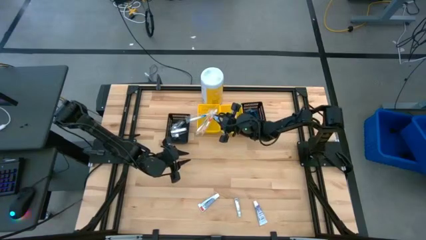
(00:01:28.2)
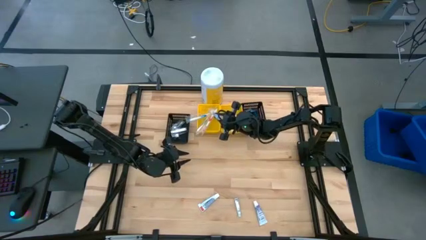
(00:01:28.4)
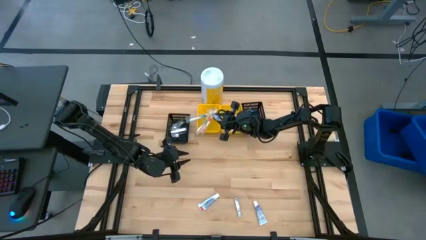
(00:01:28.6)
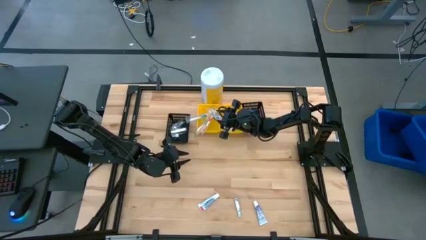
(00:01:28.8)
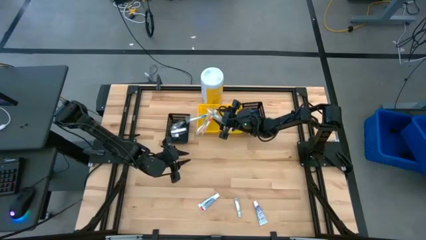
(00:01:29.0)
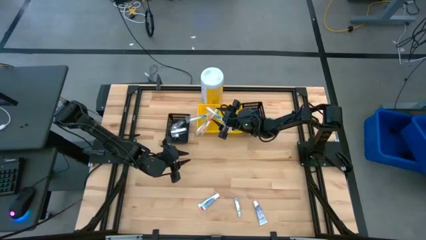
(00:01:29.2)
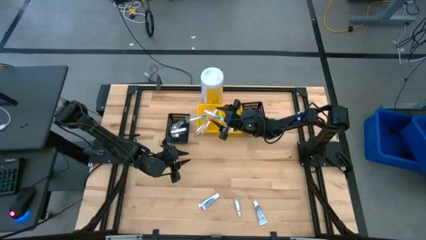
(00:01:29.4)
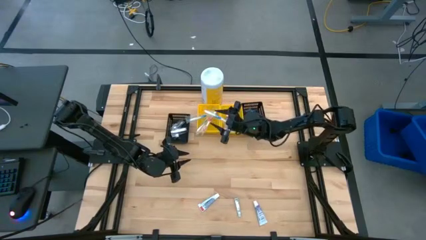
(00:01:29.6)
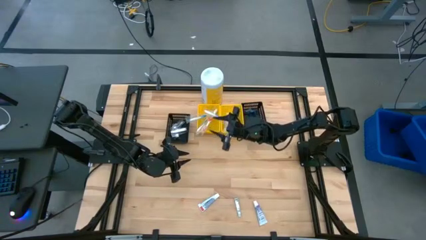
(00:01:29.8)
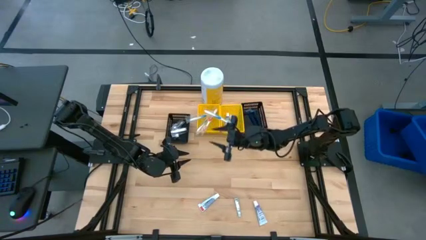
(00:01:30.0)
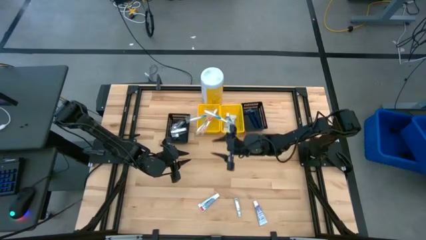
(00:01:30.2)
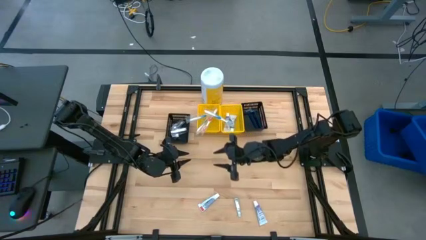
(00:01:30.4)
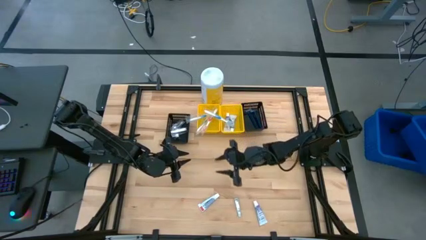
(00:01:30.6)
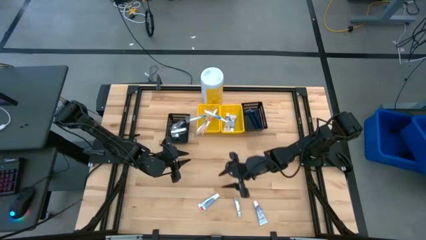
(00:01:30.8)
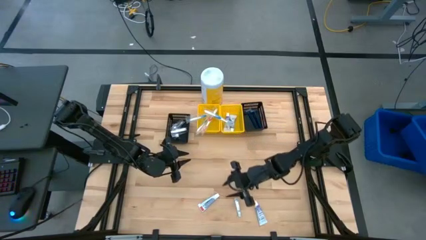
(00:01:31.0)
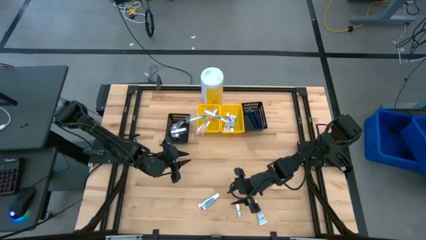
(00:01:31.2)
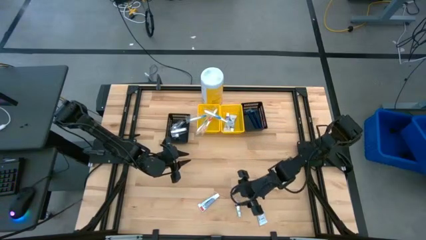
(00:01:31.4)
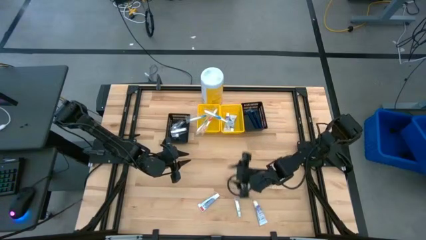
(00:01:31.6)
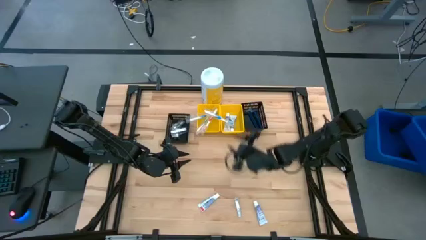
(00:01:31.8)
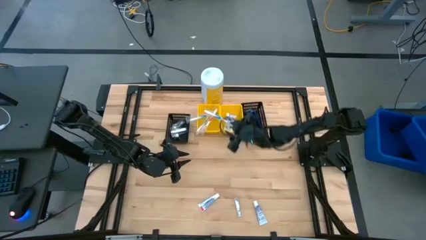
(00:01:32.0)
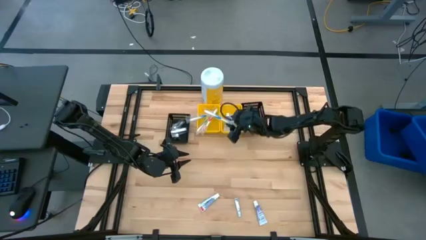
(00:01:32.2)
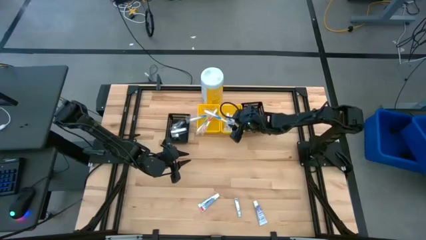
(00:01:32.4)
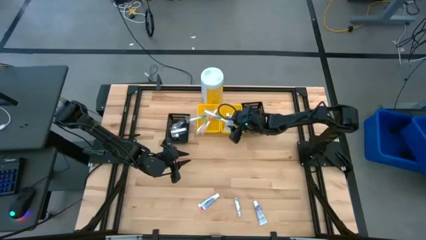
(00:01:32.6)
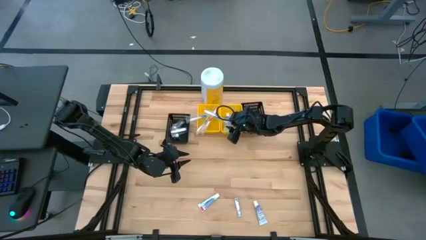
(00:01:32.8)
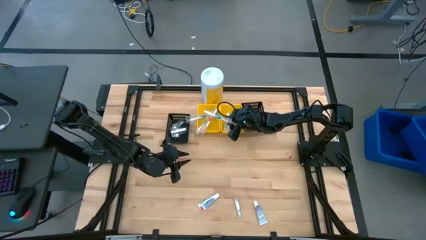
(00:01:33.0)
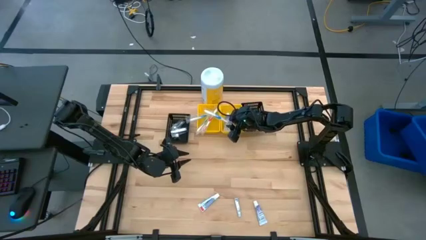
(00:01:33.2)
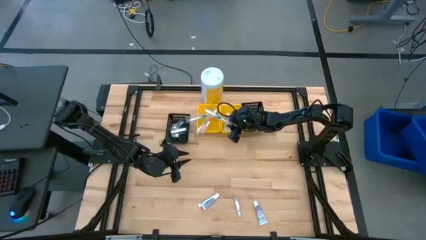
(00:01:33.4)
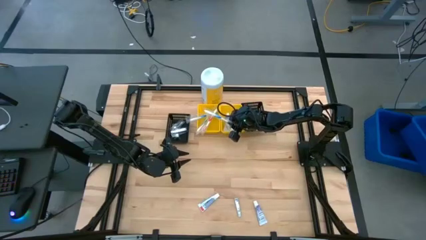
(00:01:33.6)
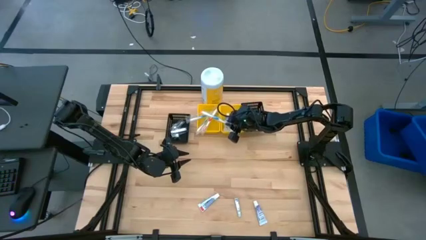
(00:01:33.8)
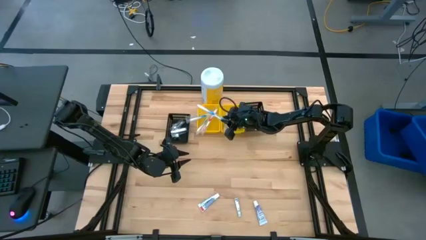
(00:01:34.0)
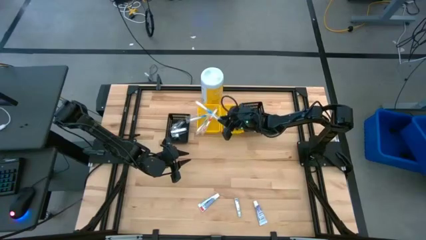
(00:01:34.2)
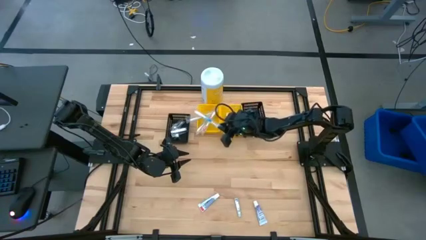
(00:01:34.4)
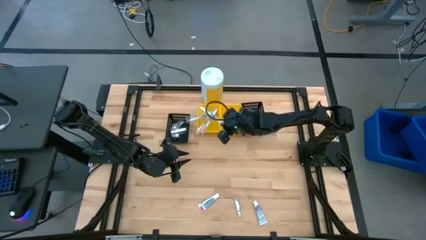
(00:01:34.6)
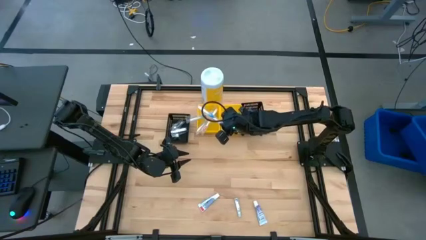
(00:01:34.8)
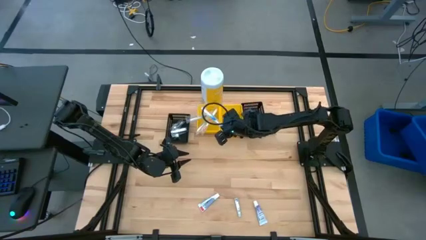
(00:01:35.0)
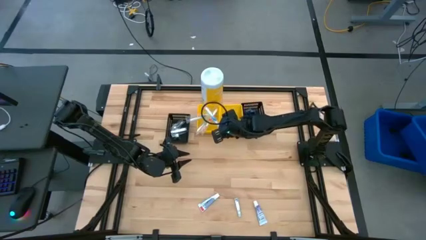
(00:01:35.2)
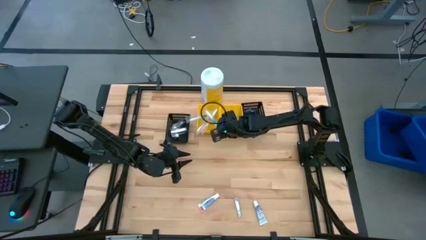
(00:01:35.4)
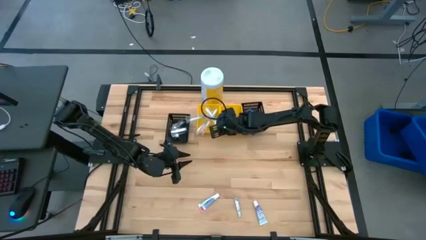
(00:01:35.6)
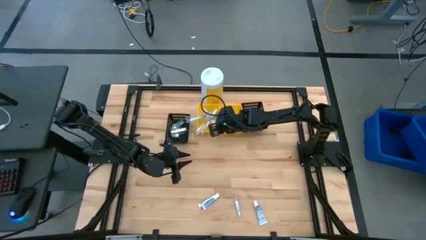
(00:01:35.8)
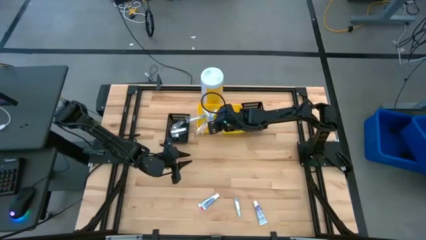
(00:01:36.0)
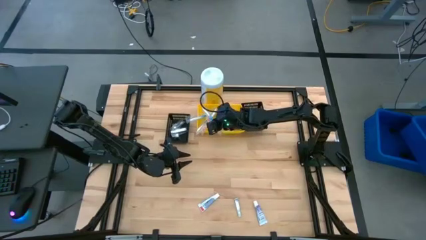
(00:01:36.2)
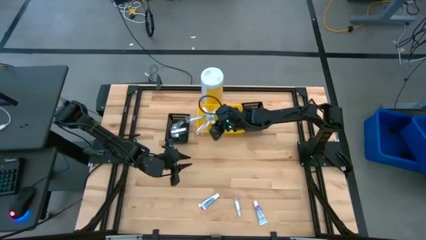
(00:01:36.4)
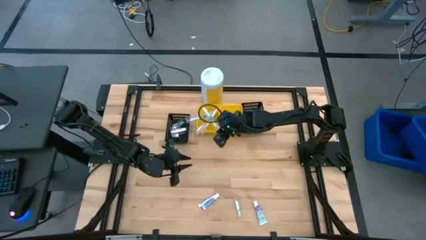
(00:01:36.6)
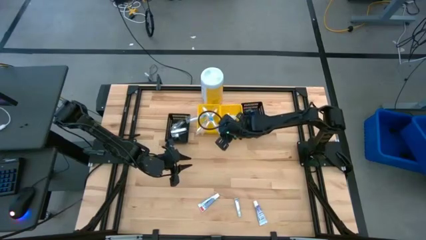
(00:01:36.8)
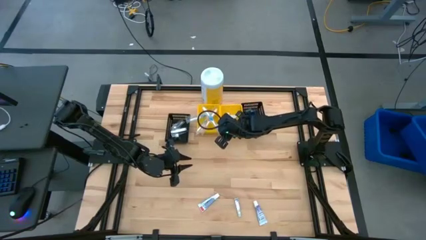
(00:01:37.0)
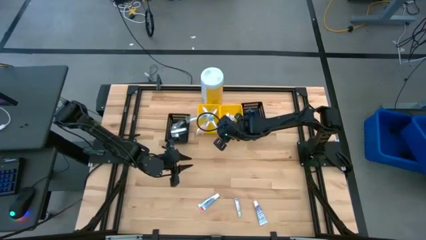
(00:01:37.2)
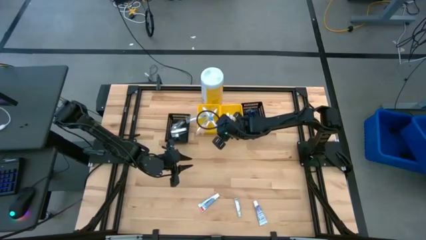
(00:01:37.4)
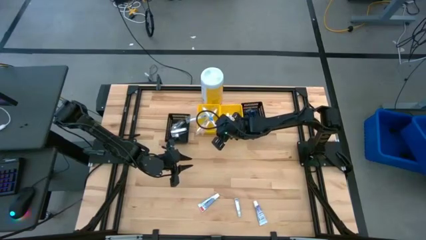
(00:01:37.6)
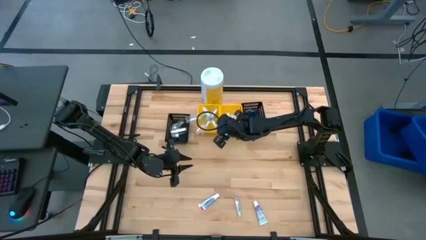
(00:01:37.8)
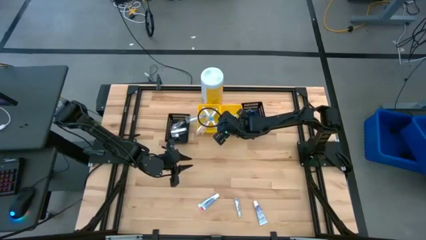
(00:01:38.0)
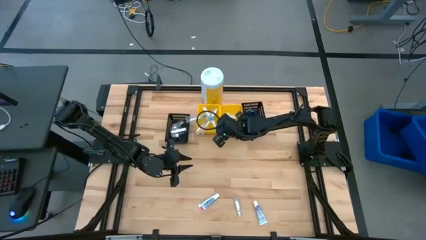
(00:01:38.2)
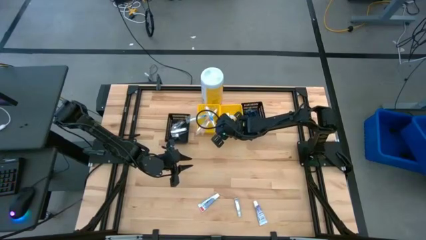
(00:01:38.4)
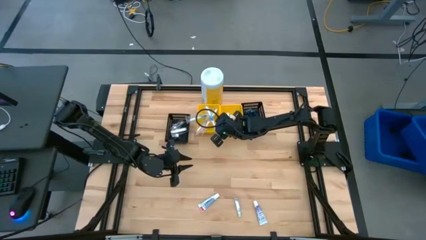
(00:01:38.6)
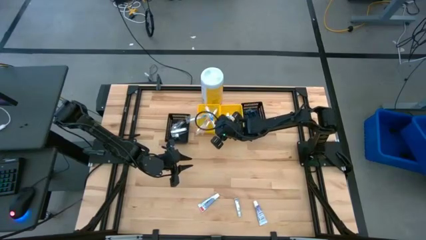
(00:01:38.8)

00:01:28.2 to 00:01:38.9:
Task: Pick & Place Travel size toiletries
Put the blue toothbrush into the left yellow bin

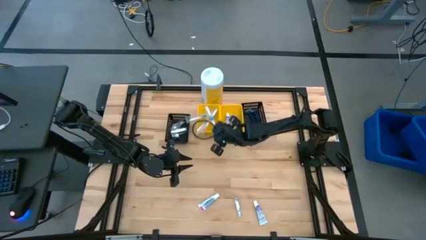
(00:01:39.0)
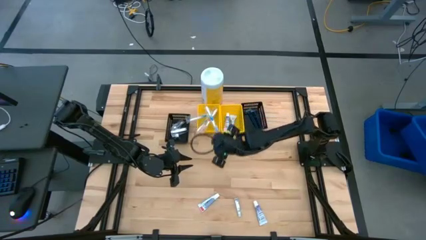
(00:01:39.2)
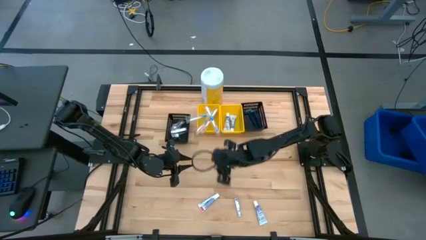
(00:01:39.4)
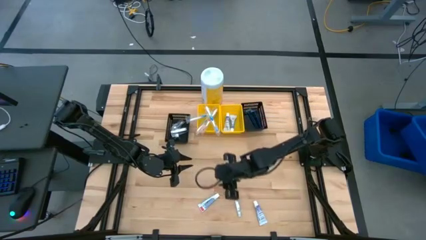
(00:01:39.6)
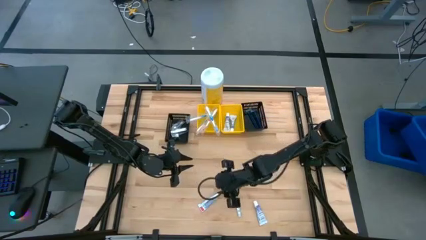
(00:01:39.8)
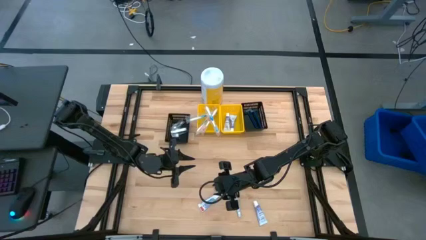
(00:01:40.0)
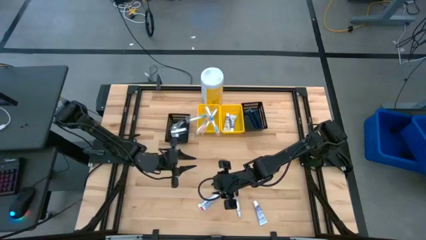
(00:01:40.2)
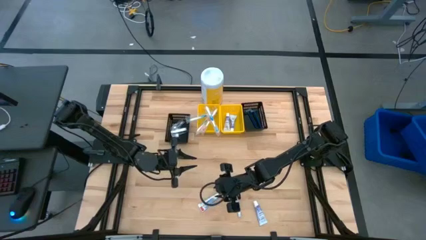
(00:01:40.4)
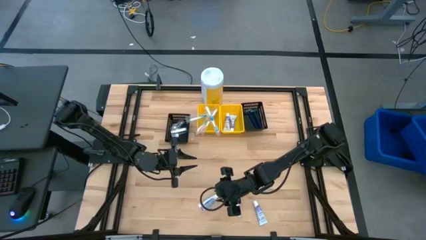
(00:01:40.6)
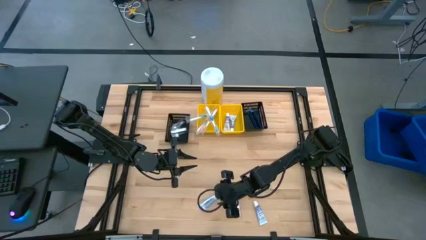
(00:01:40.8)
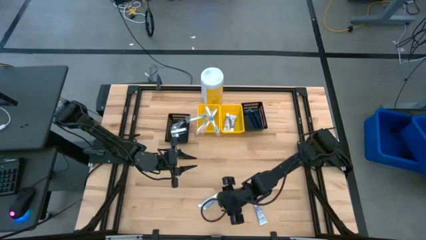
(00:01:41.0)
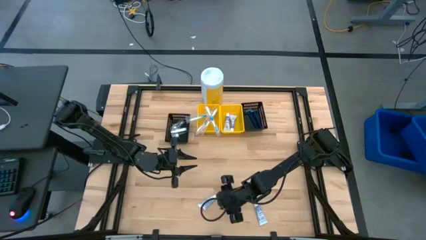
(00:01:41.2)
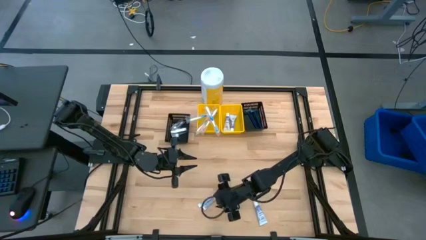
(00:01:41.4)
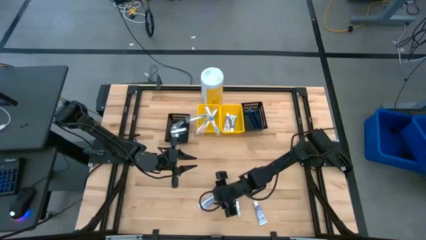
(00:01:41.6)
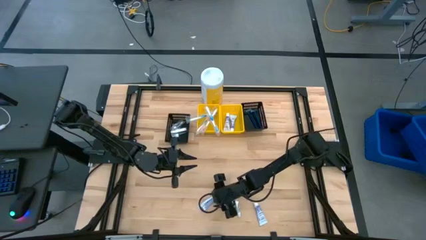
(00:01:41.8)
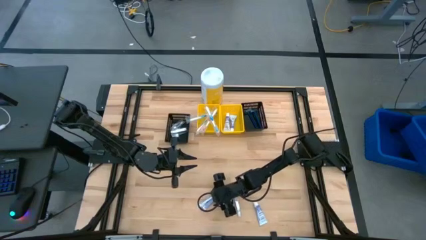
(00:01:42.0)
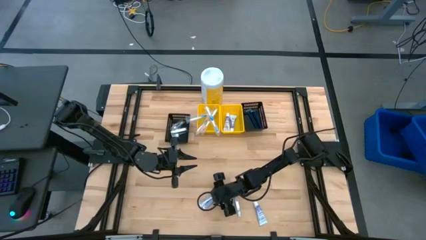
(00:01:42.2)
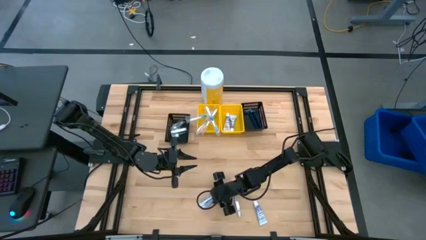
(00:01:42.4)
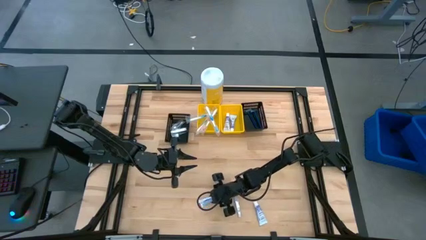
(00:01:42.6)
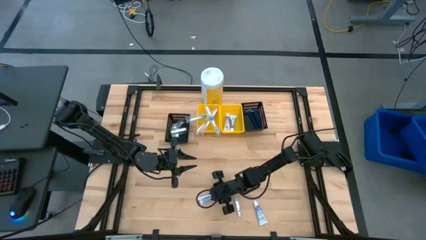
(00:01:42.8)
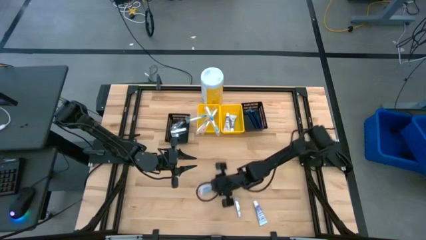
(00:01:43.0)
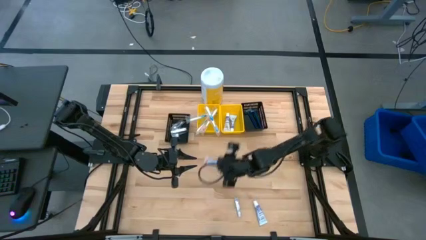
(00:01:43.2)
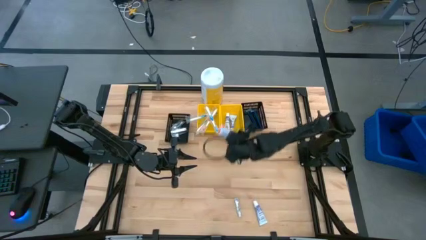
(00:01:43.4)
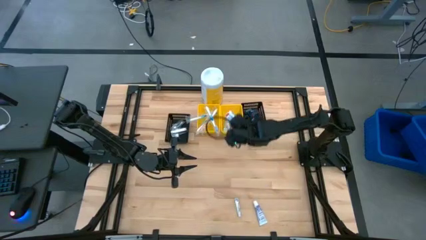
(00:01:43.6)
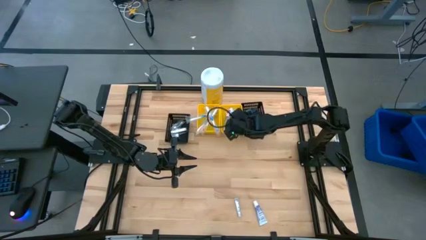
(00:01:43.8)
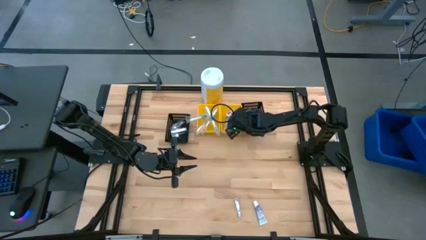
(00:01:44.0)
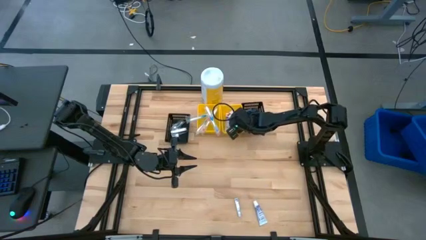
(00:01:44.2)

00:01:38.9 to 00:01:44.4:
Put the white toothpaste into the right yellow bin

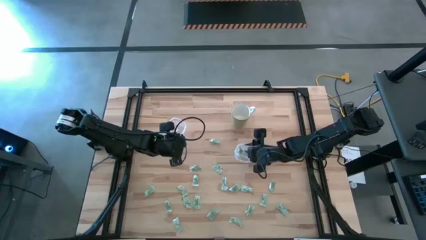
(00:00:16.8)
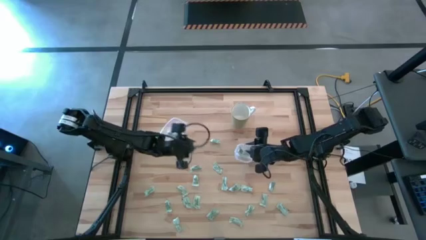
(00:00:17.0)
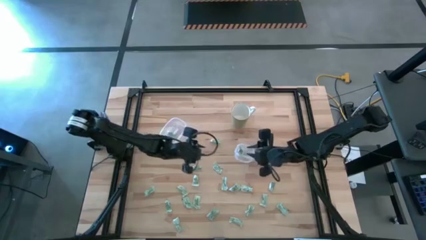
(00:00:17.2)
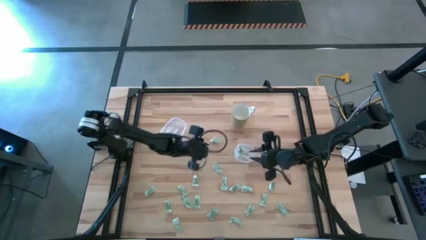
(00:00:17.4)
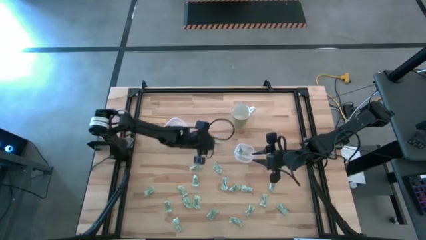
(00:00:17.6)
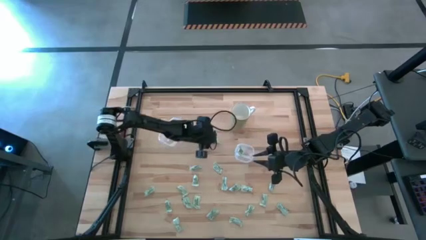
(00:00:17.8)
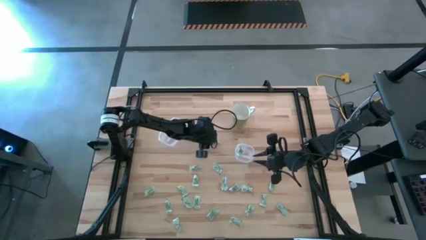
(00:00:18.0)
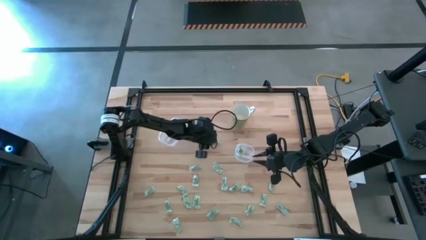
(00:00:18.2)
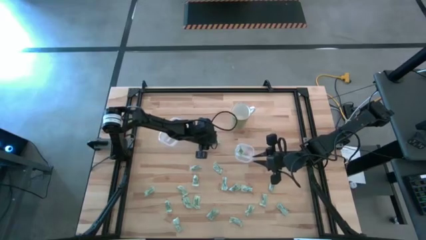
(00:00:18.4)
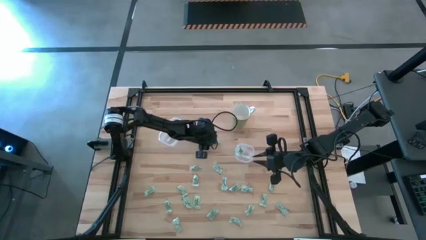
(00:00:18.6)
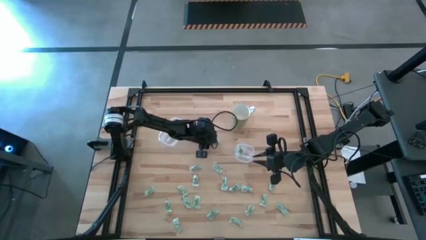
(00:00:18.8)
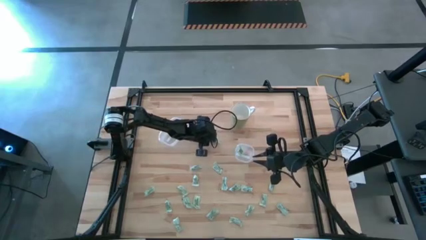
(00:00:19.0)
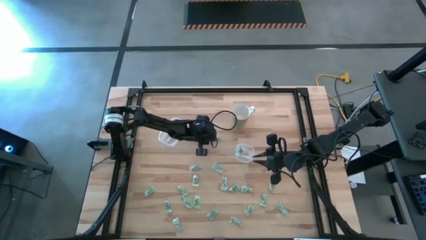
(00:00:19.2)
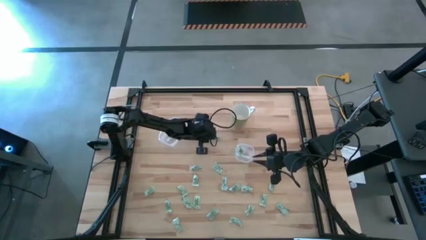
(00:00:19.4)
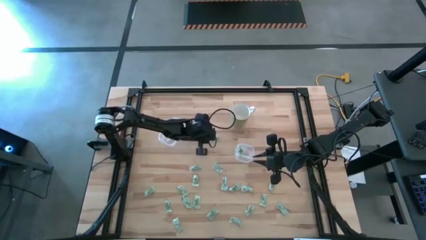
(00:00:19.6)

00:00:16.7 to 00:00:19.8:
Task: Pick and place Stevia / Truvia into bins
Put the stevia packet into the left transparent container
